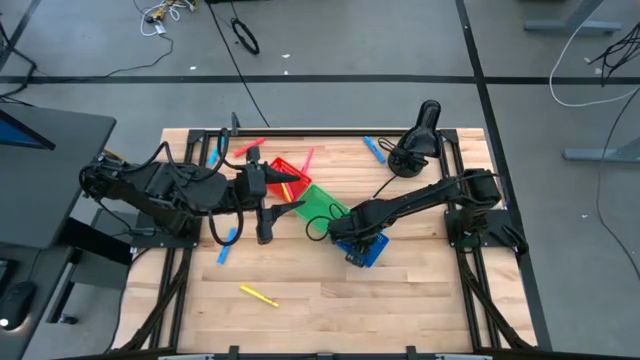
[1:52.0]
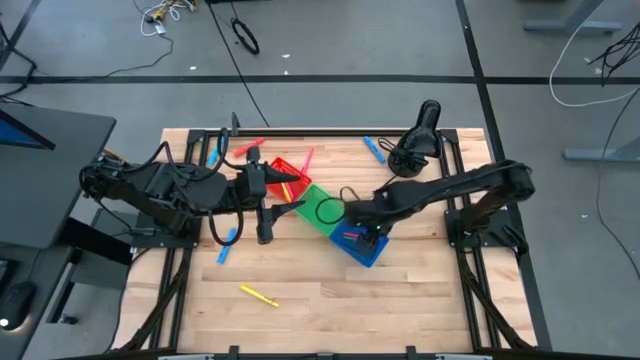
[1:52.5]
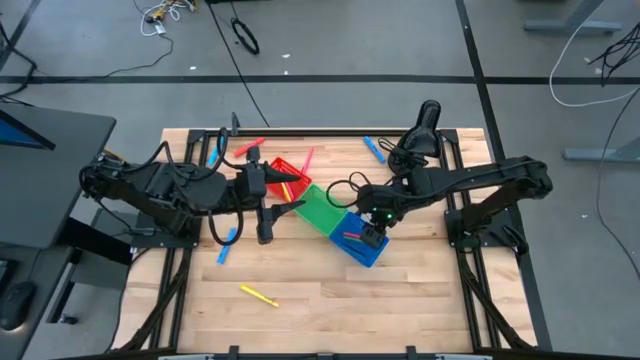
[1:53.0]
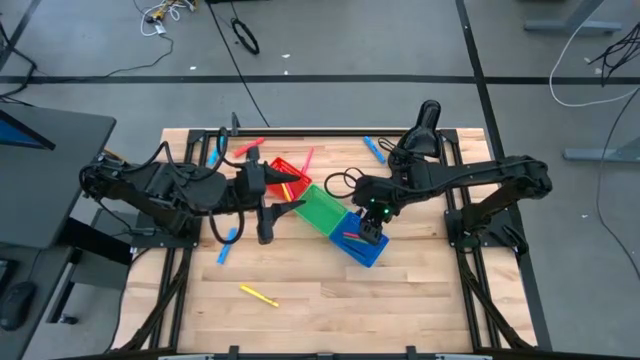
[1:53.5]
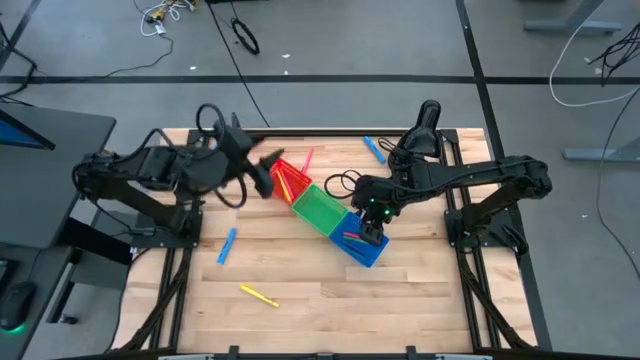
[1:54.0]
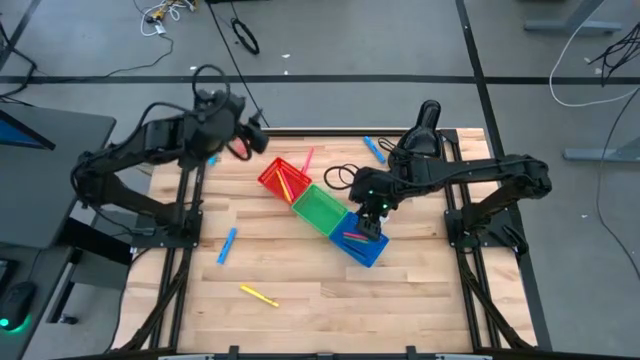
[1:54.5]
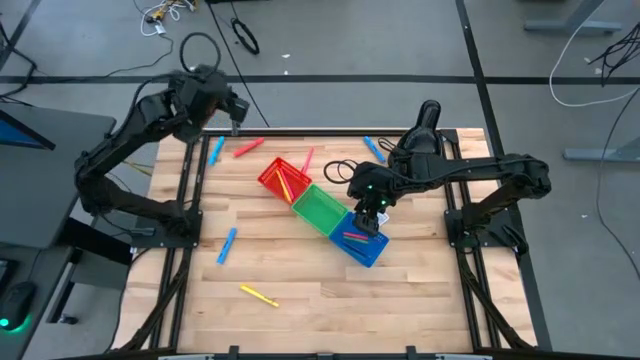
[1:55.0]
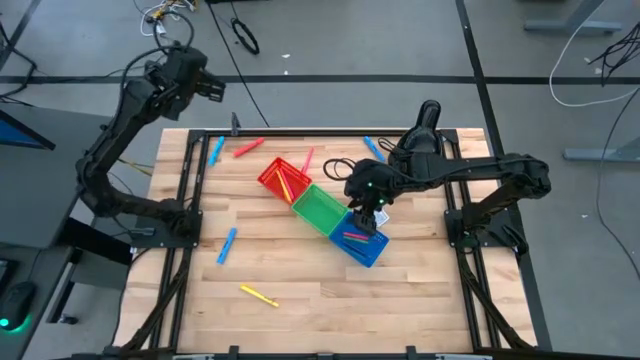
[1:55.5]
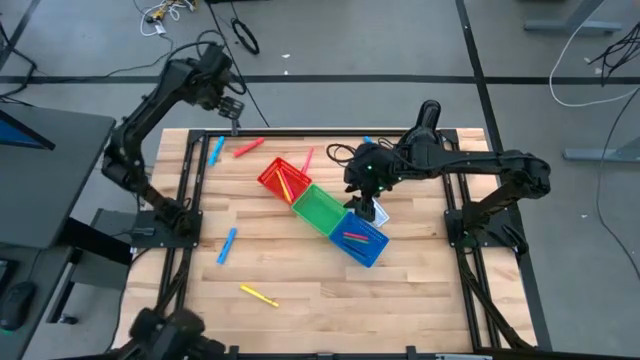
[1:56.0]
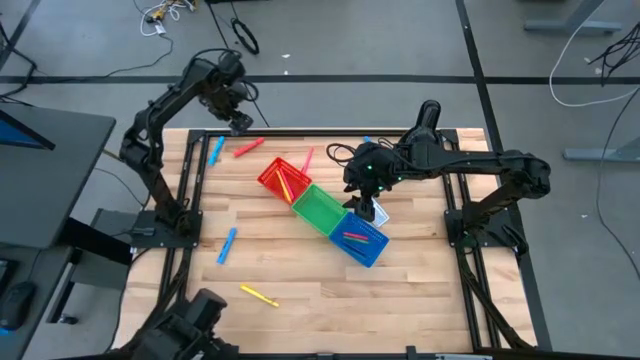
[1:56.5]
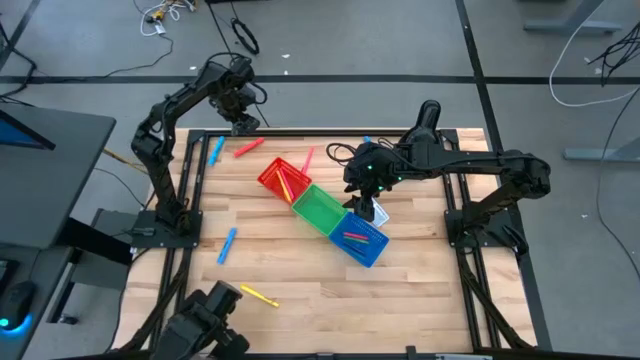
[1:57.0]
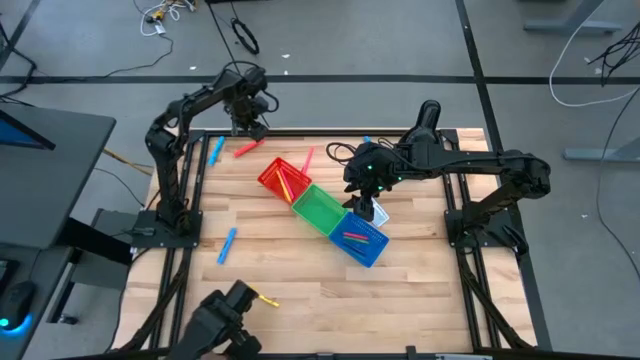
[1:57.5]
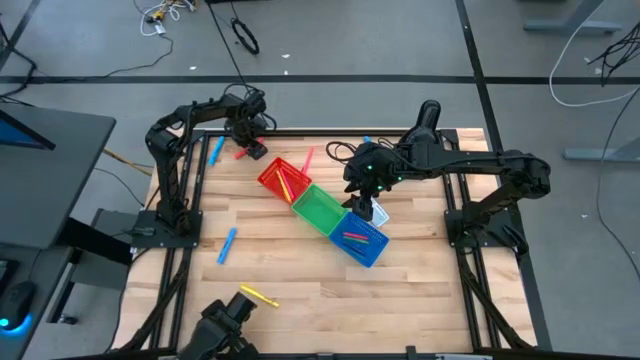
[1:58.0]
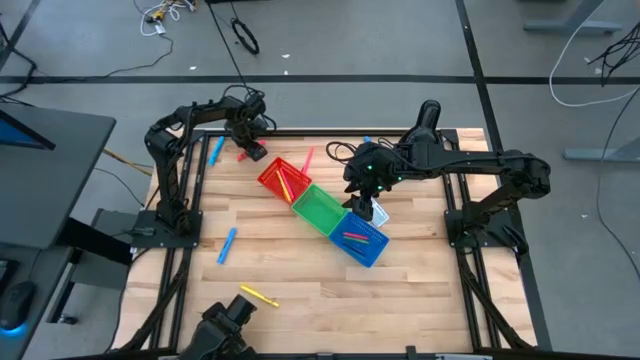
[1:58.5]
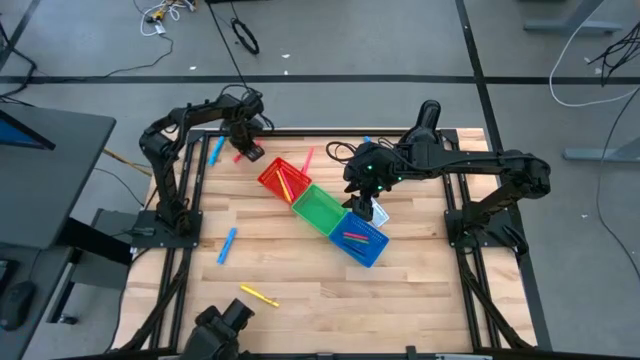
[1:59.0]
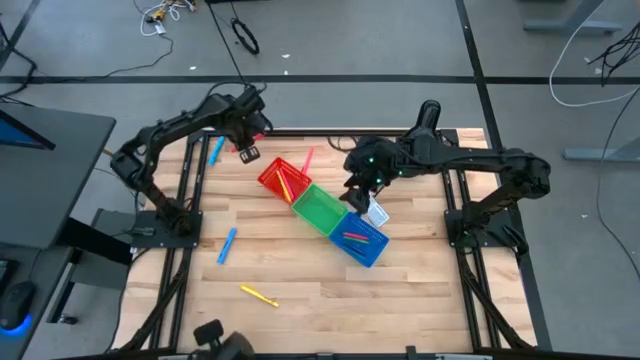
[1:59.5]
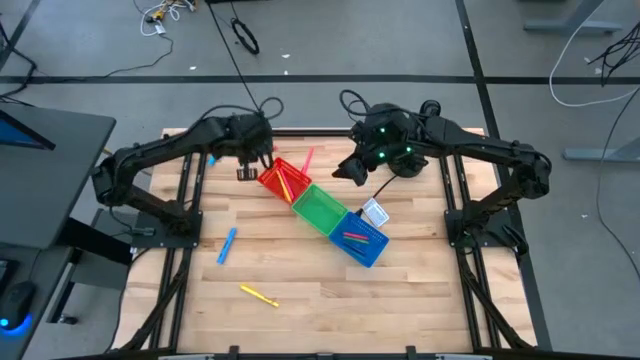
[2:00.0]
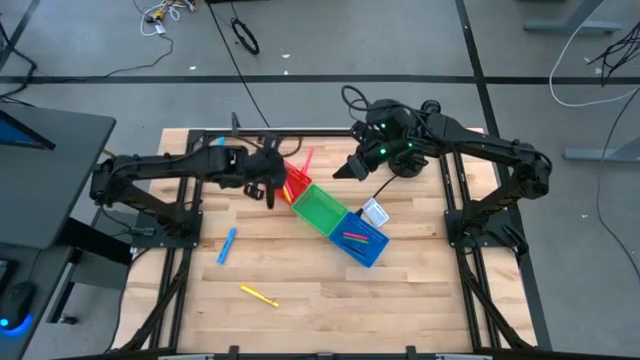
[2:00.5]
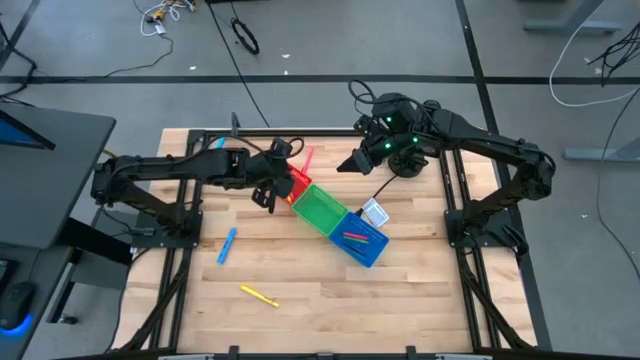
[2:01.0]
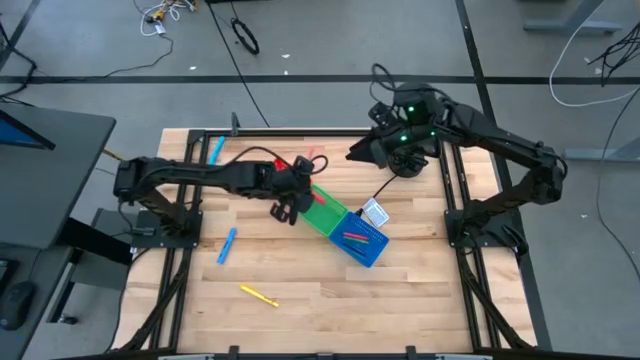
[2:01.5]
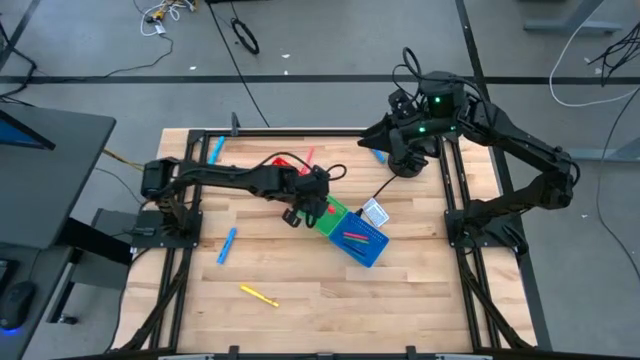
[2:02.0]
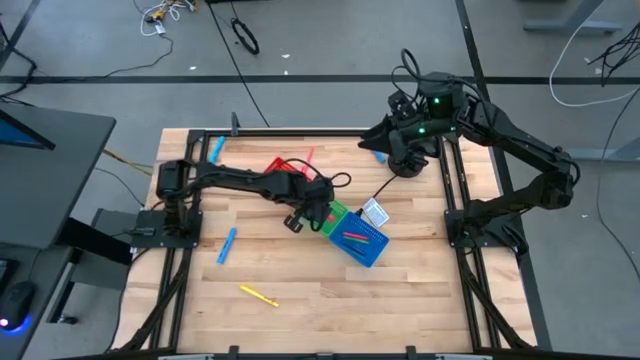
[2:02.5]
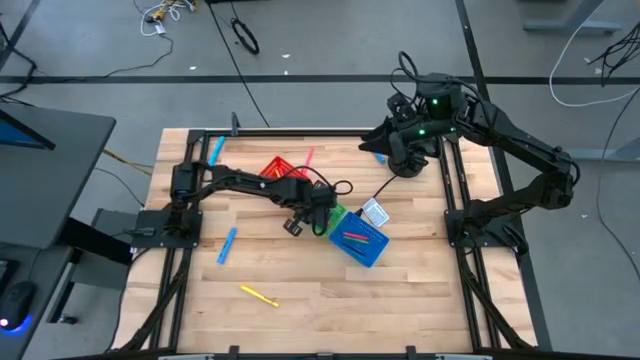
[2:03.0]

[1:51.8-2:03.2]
Task: Pick & Place Markers
Put the pink highlighter pen into the green bin

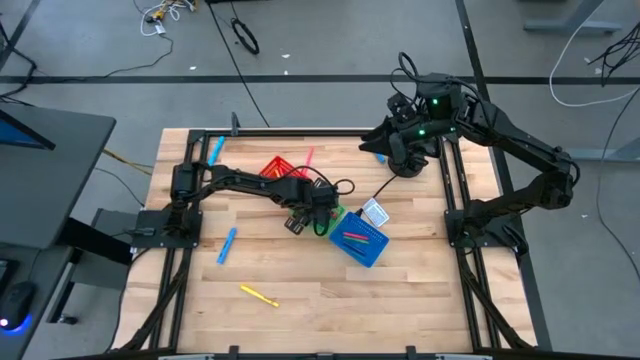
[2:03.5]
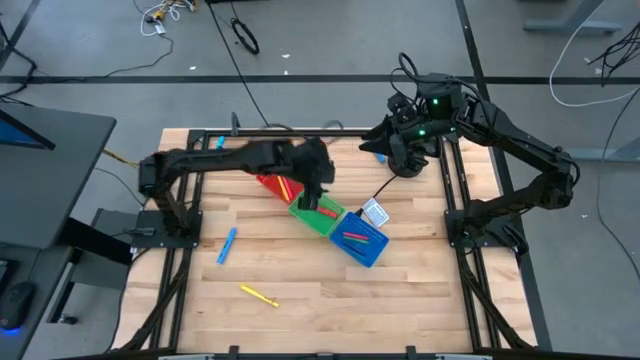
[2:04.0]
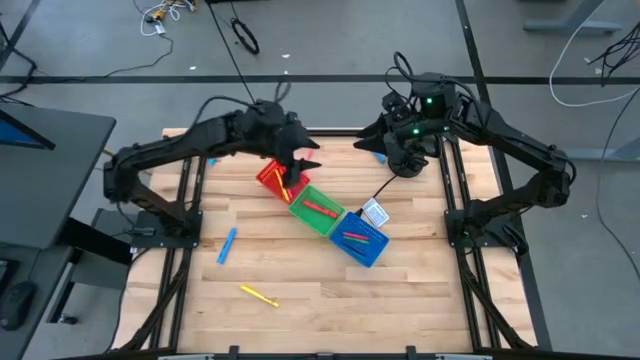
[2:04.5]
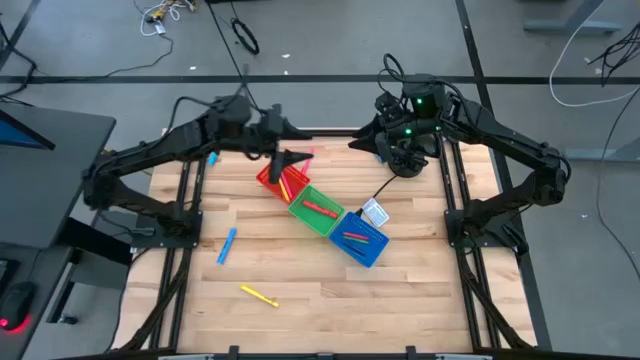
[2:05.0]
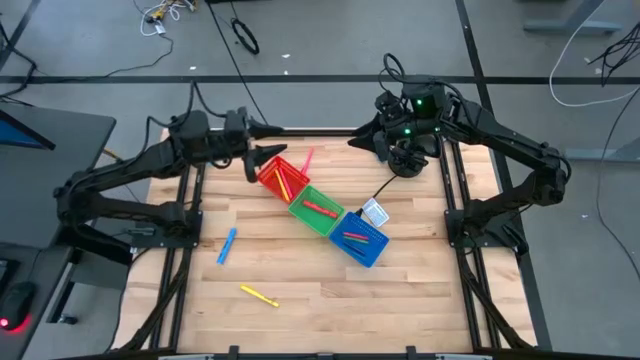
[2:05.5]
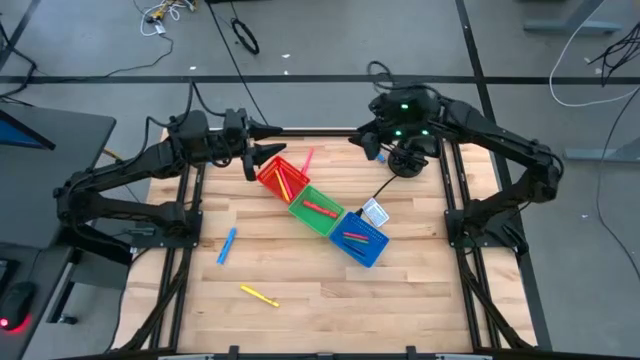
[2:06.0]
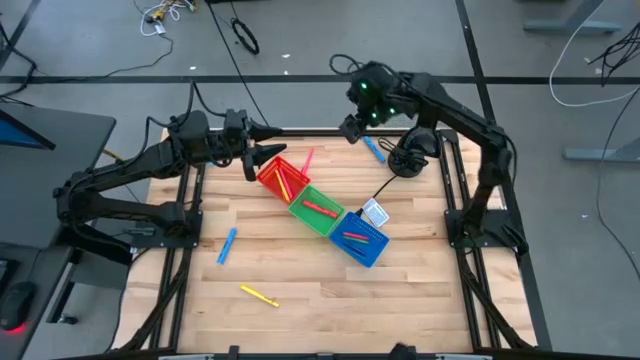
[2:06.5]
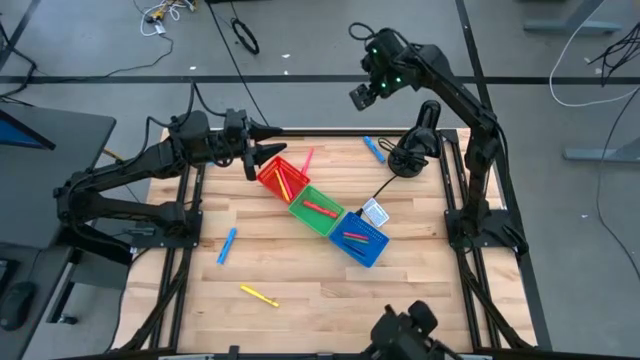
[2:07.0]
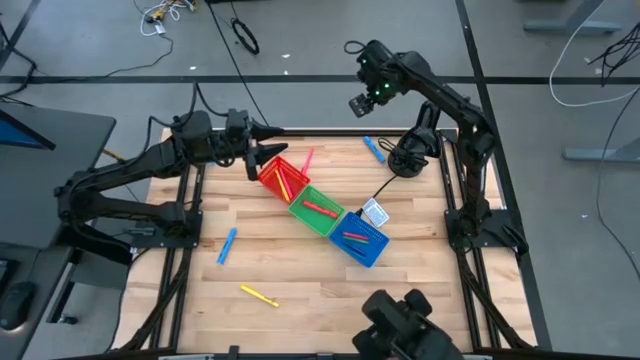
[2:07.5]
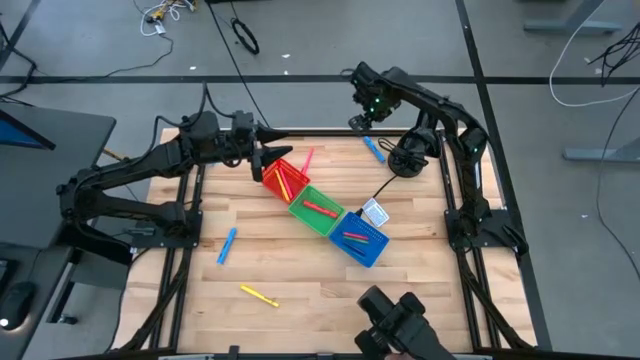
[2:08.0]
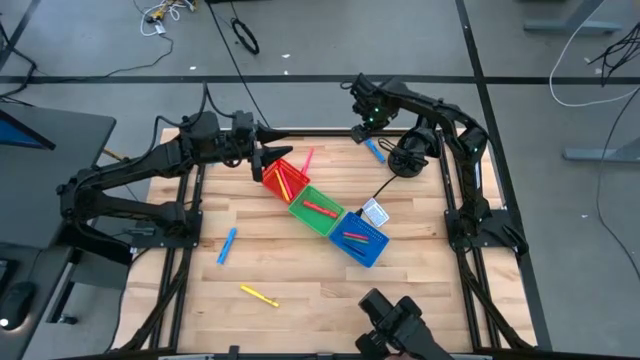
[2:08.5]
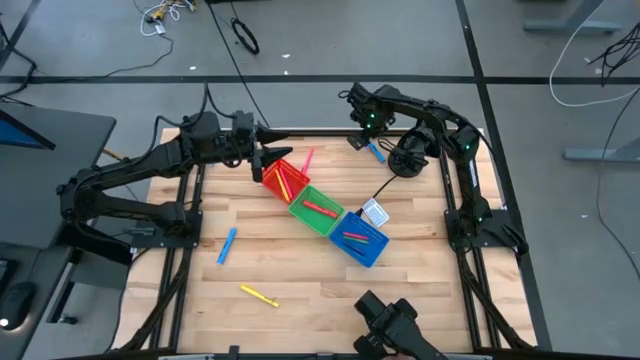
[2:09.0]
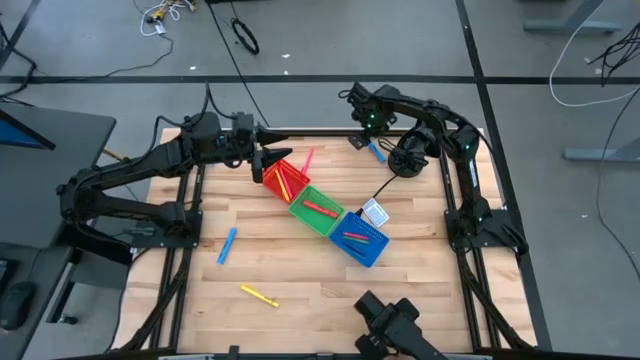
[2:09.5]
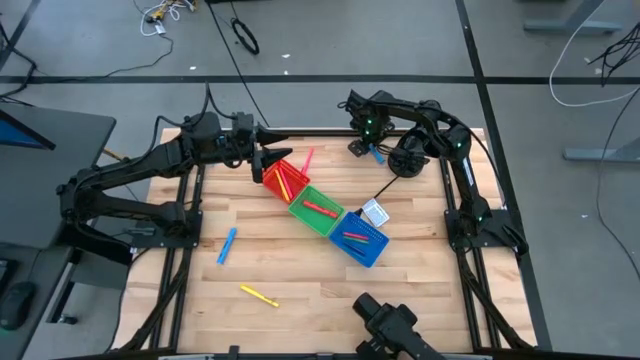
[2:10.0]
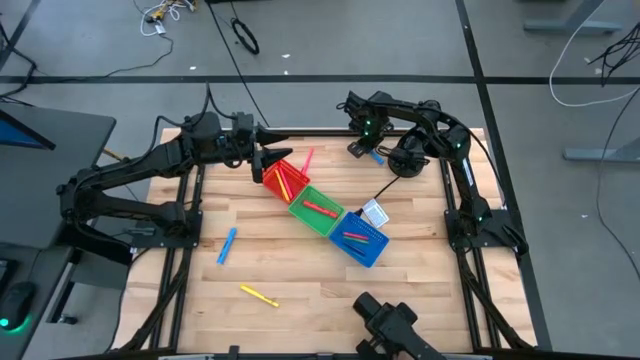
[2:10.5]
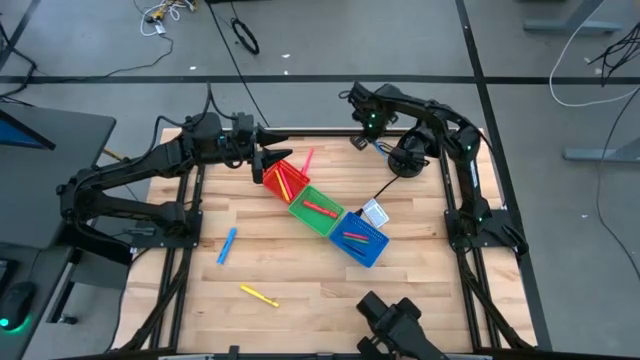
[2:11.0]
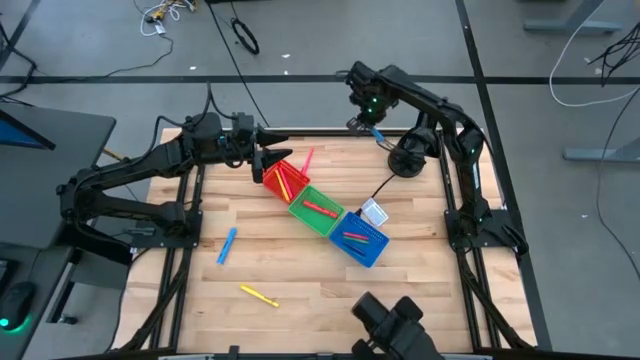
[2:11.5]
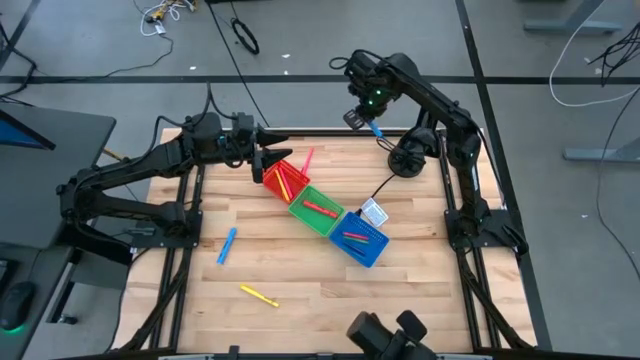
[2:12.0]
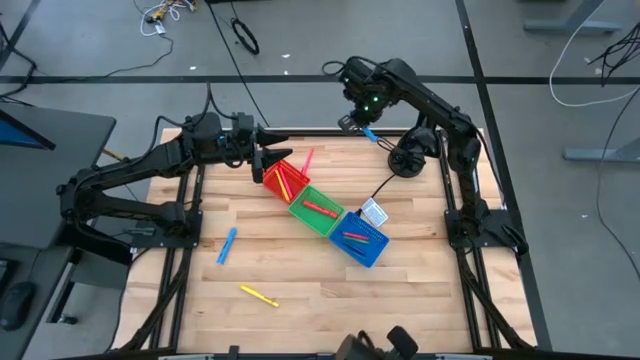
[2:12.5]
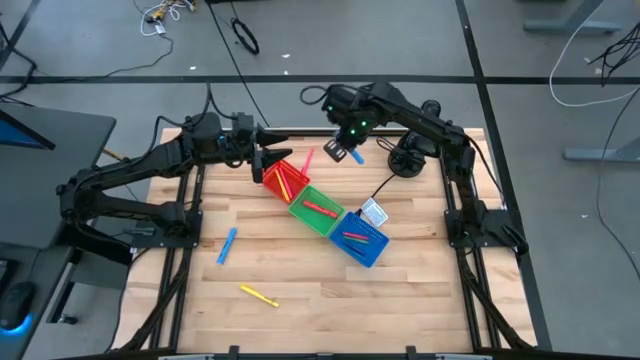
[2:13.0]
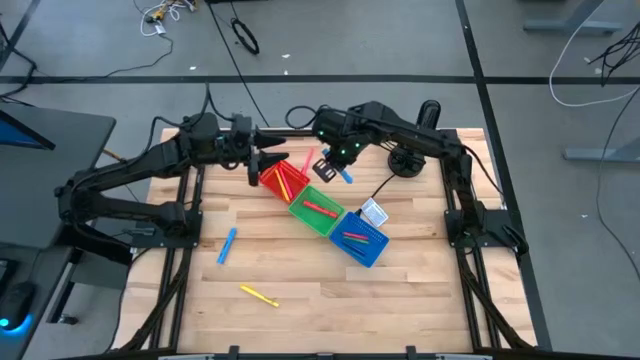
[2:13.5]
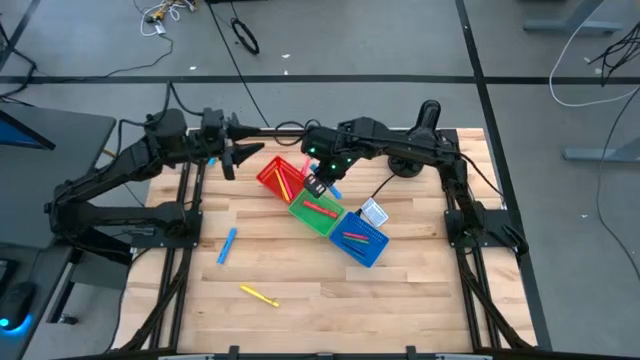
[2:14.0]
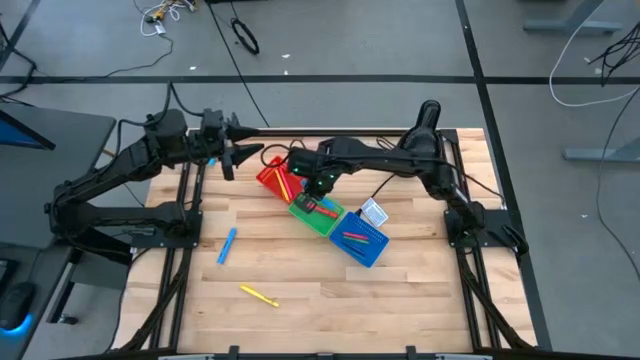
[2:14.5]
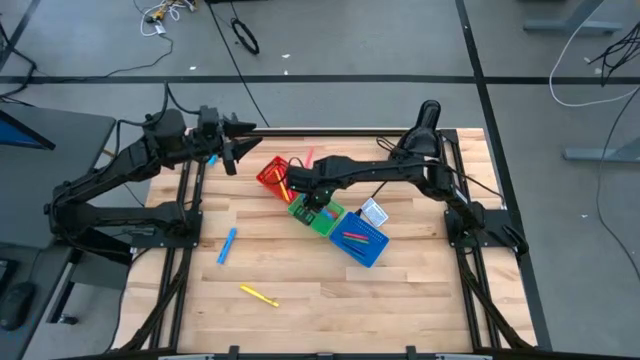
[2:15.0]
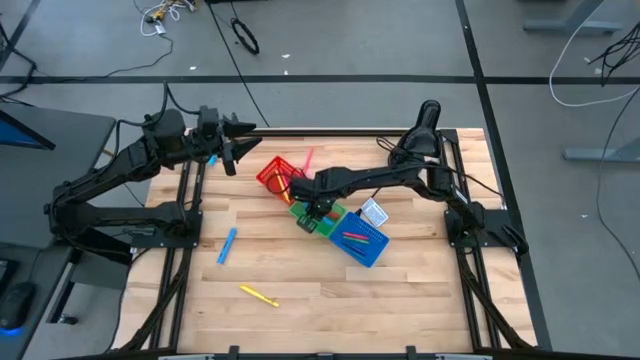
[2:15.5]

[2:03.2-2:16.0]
Put the top blue highlighter pen into the green bin
